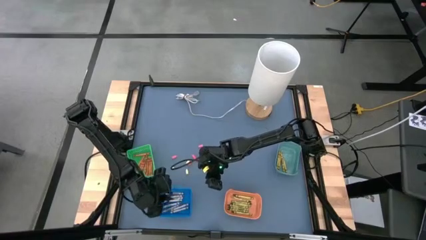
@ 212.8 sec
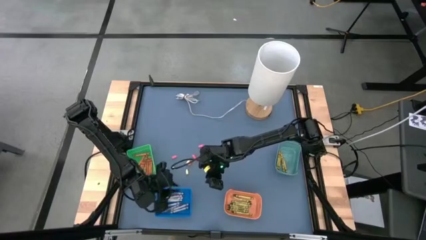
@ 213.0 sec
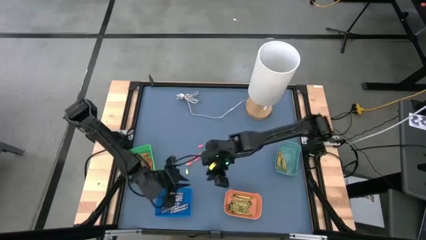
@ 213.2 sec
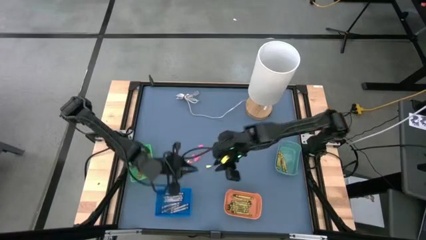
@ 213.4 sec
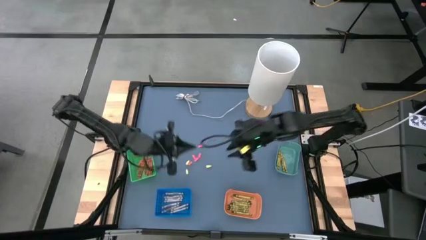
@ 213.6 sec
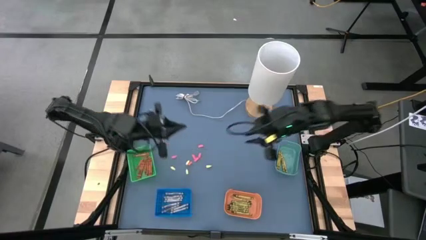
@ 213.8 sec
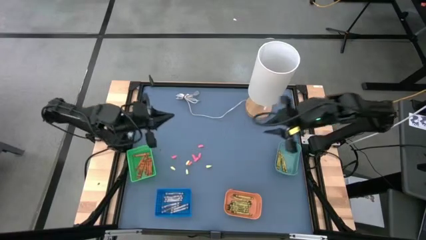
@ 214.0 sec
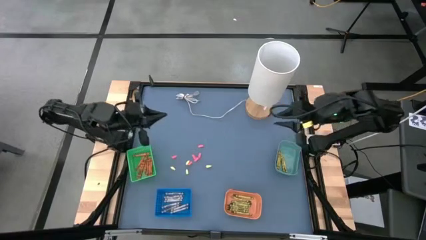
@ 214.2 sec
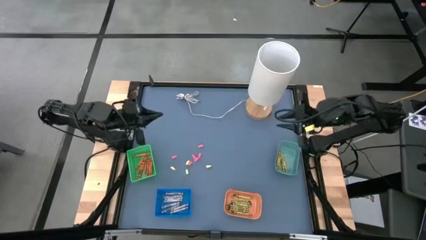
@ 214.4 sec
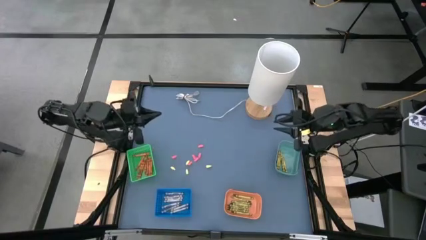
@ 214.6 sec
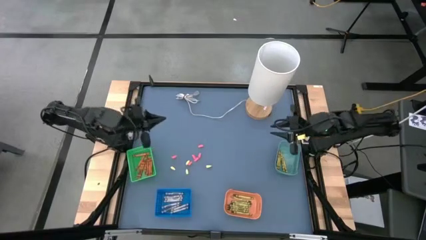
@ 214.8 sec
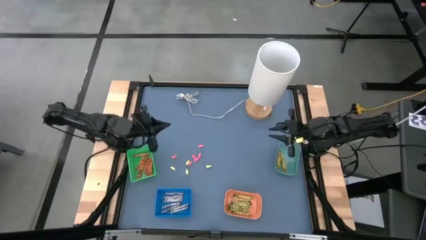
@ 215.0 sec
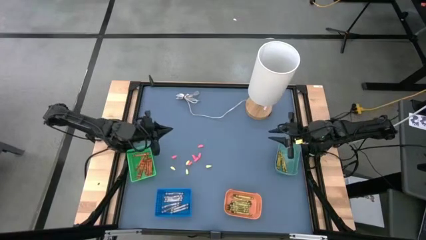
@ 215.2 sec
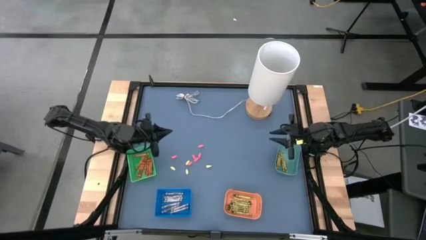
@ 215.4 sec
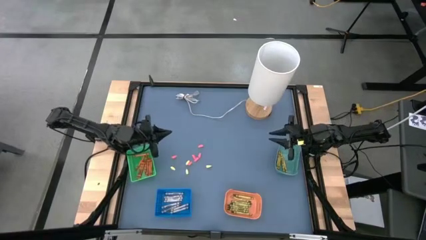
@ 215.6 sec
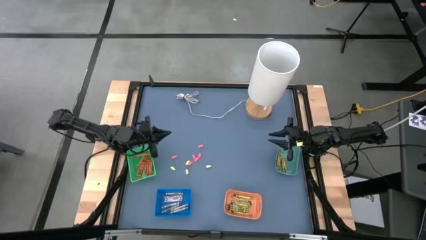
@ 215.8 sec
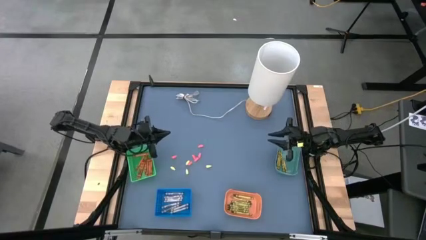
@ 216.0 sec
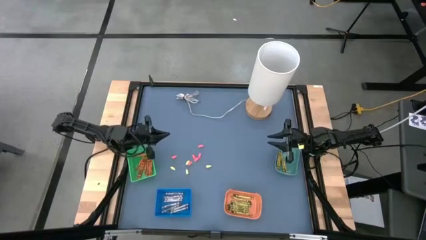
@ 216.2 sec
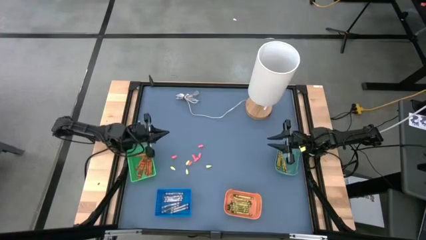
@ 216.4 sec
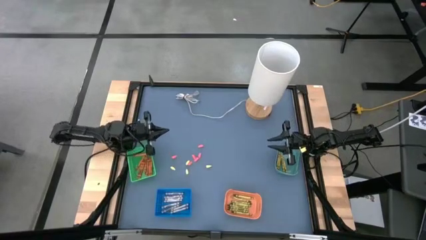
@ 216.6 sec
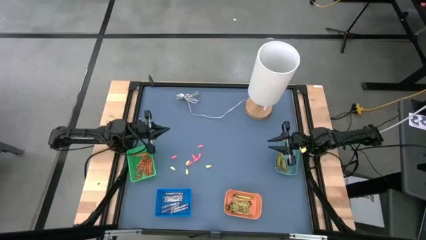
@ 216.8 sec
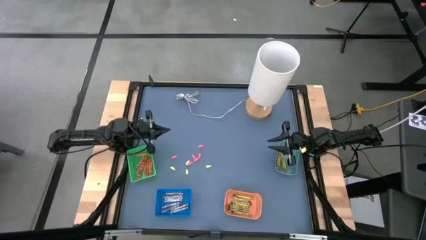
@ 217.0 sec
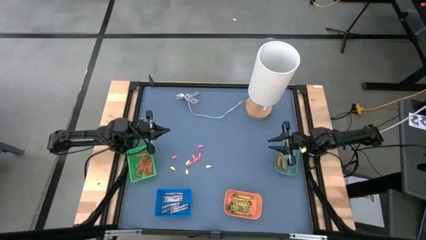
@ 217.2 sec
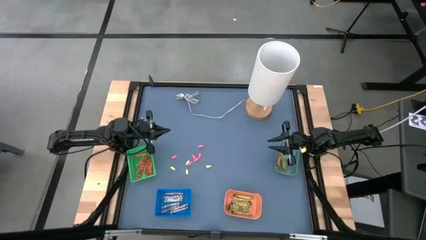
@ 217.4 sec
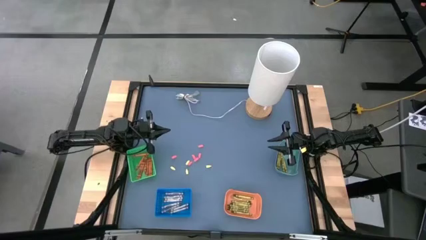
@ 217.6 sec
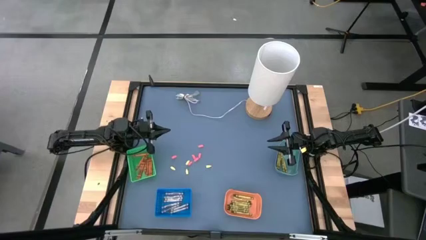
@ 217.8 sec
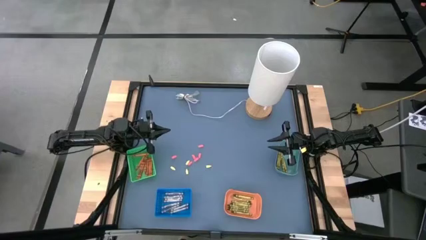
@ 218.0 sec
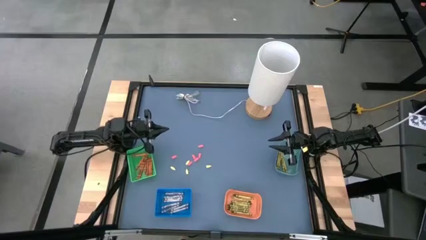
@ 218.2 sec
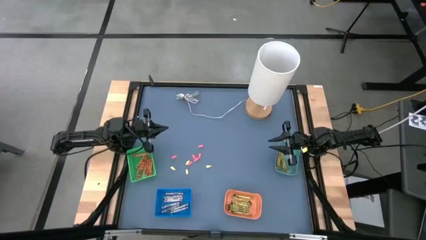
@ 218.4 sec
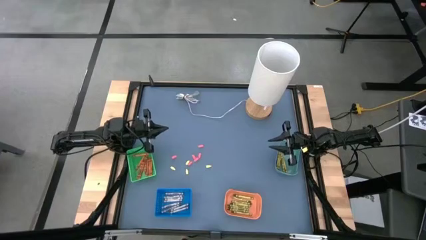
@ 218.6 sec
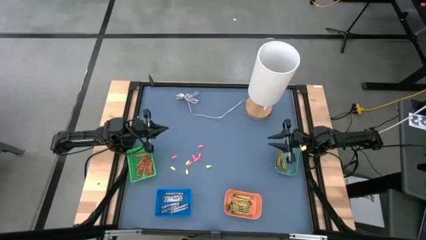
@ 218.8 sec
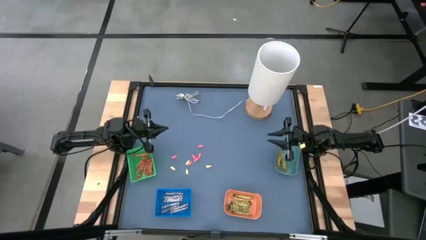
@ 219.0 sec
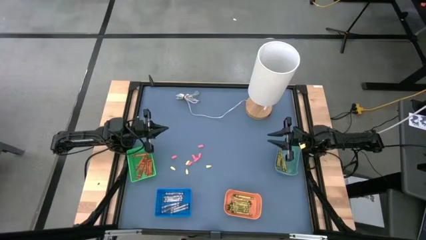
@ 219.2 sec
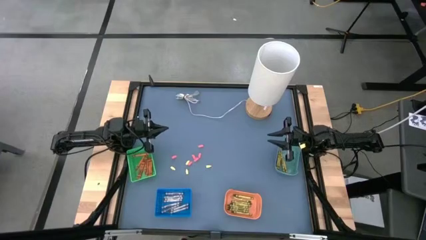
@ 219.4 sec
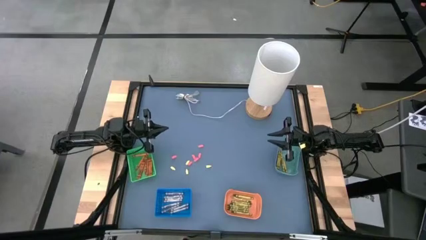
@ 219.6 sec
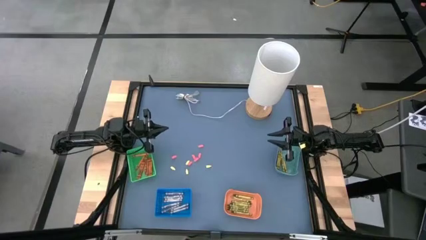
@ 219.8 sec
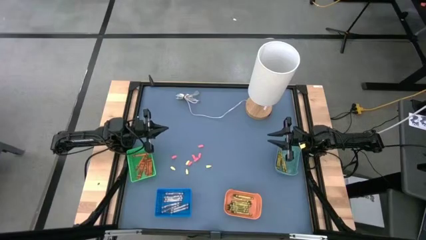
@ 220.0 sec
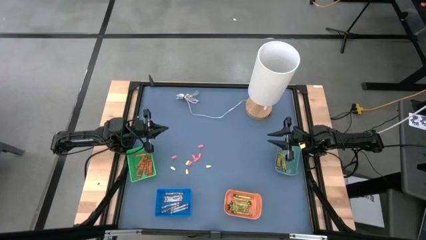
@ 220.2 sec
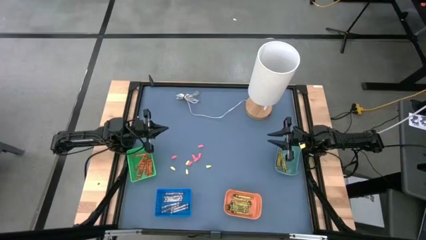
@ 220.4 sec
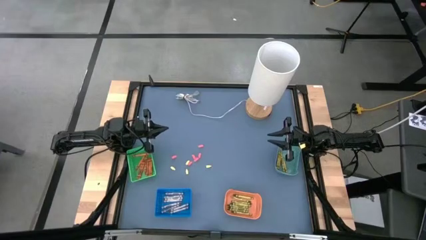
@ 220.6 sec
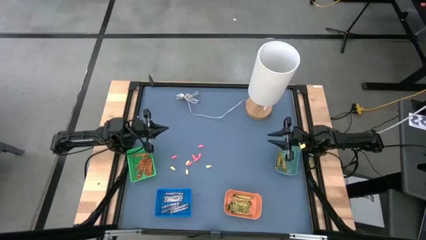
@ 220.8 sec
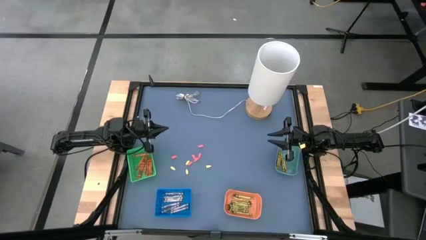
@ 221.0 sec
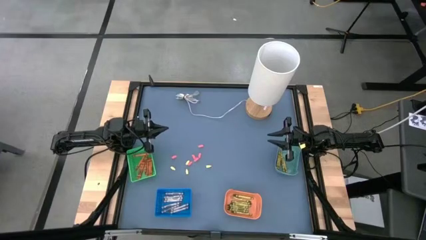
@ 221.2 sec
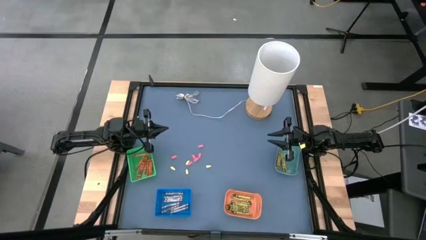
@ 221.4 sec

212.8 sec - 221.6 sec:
Task: Sort crayons
Return to Home Position

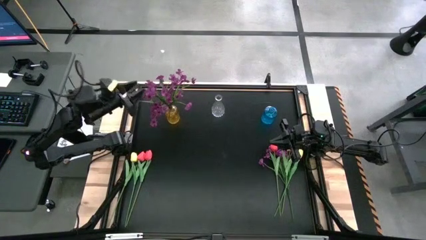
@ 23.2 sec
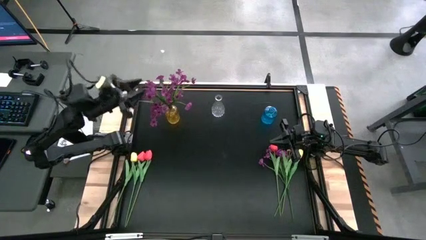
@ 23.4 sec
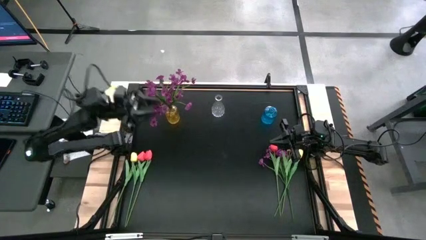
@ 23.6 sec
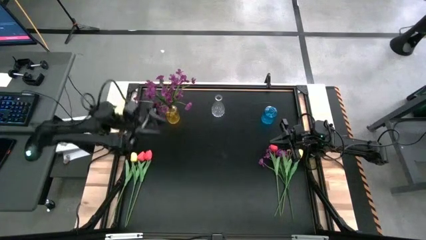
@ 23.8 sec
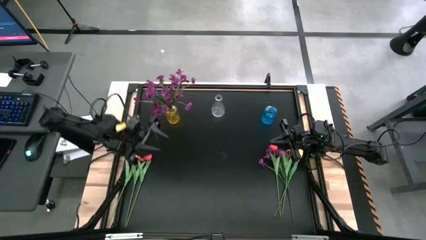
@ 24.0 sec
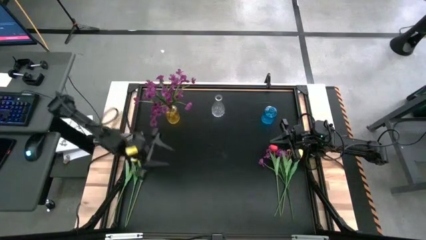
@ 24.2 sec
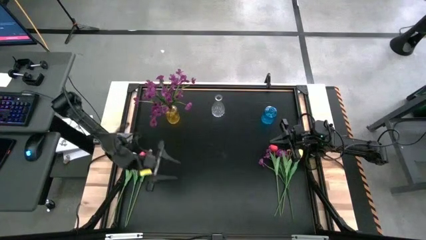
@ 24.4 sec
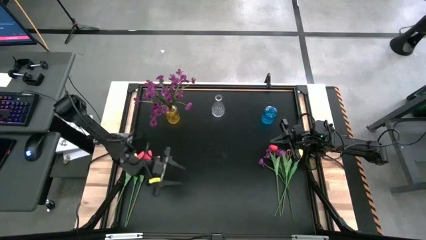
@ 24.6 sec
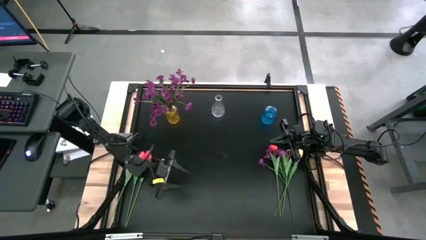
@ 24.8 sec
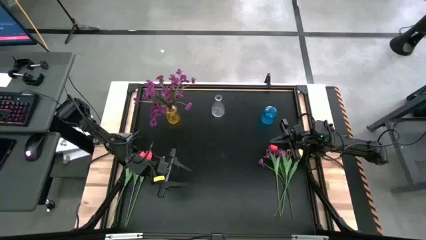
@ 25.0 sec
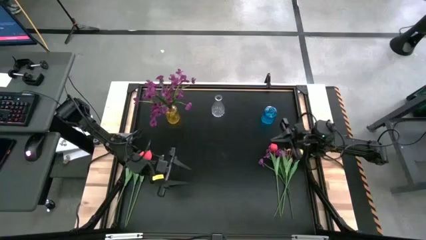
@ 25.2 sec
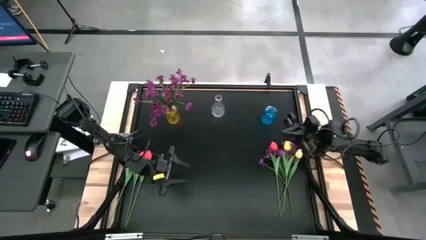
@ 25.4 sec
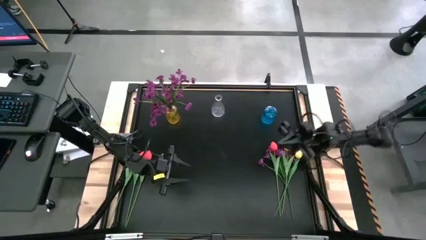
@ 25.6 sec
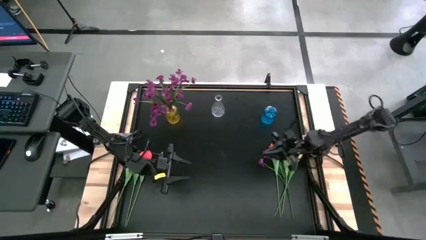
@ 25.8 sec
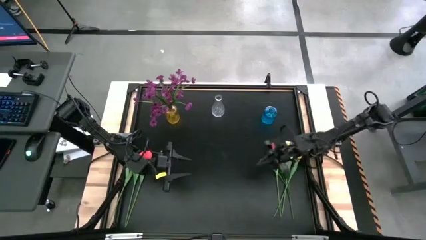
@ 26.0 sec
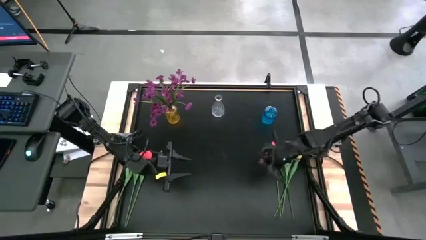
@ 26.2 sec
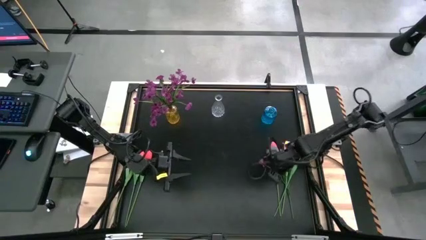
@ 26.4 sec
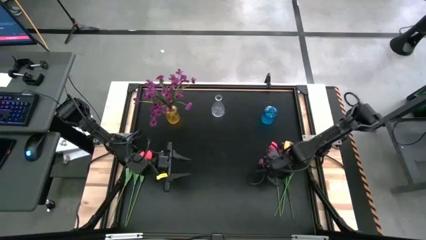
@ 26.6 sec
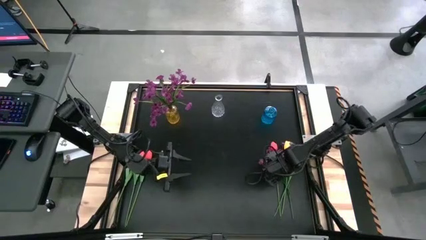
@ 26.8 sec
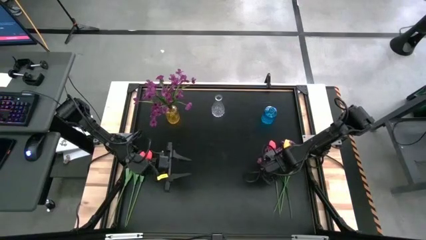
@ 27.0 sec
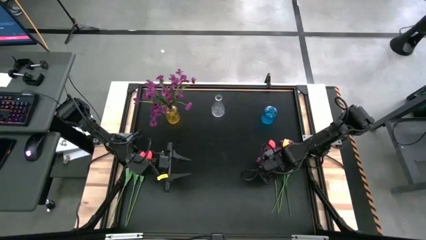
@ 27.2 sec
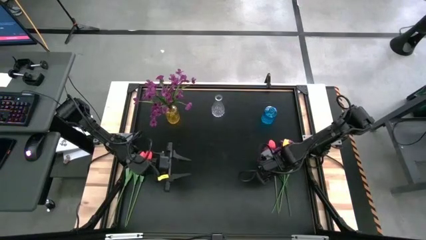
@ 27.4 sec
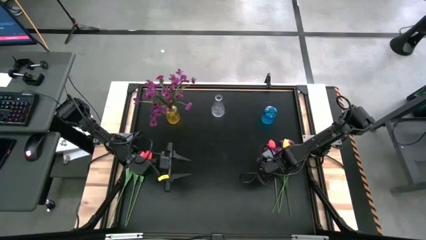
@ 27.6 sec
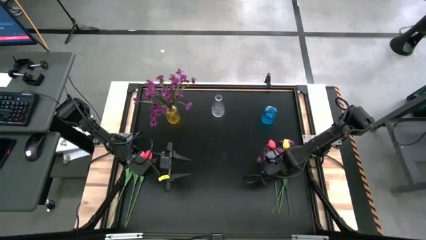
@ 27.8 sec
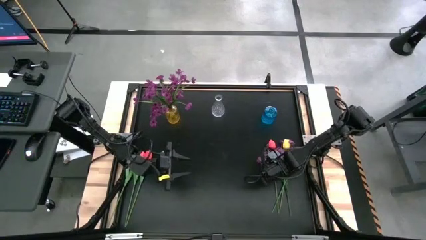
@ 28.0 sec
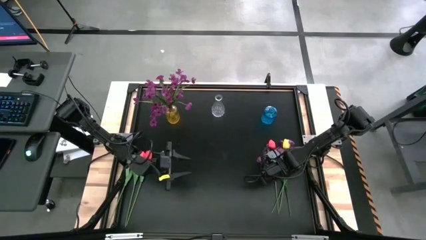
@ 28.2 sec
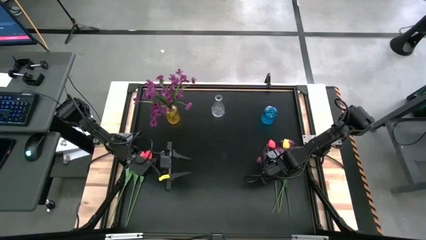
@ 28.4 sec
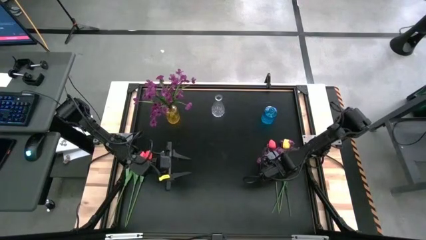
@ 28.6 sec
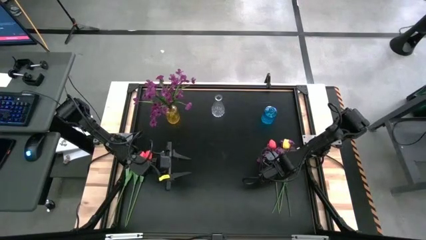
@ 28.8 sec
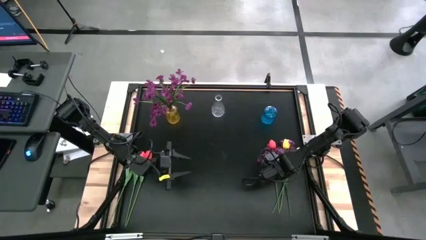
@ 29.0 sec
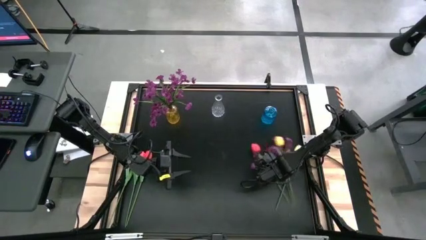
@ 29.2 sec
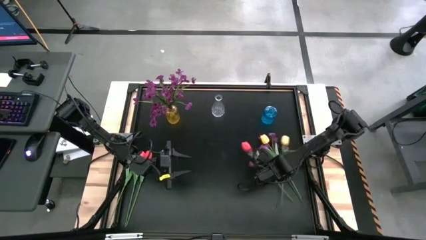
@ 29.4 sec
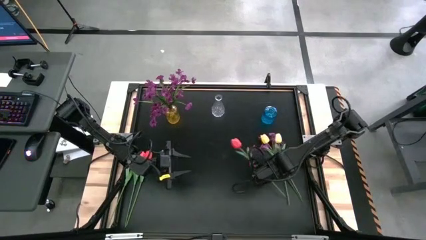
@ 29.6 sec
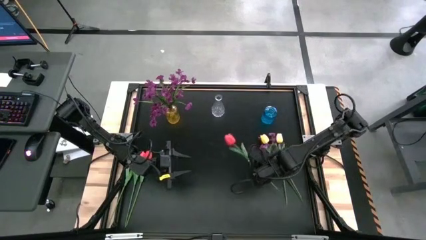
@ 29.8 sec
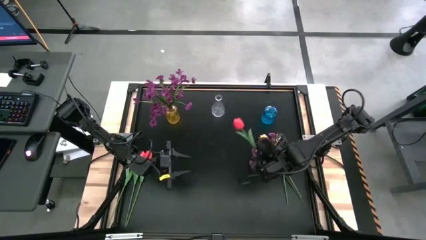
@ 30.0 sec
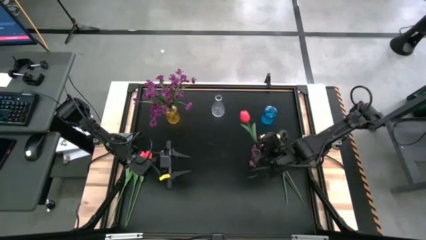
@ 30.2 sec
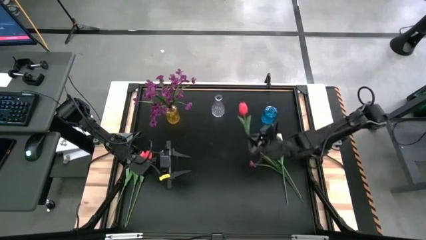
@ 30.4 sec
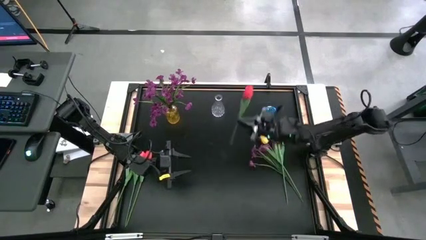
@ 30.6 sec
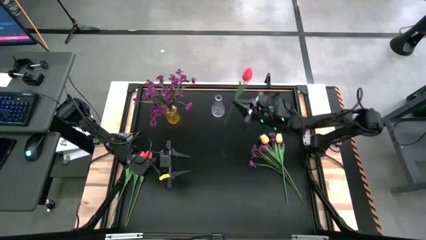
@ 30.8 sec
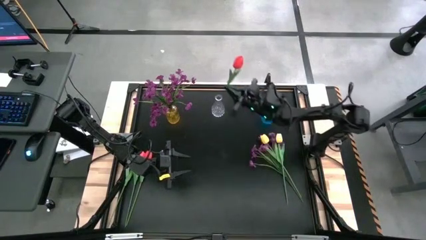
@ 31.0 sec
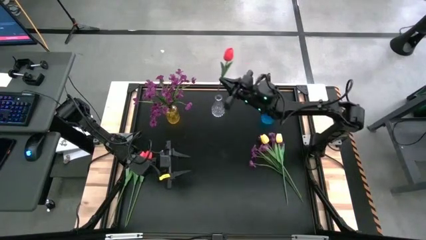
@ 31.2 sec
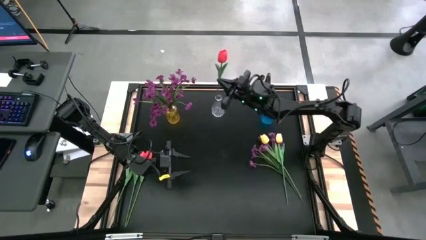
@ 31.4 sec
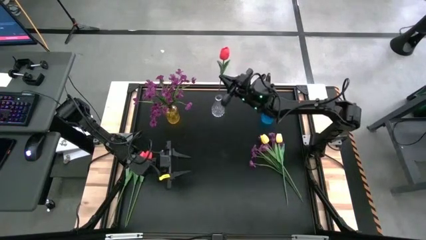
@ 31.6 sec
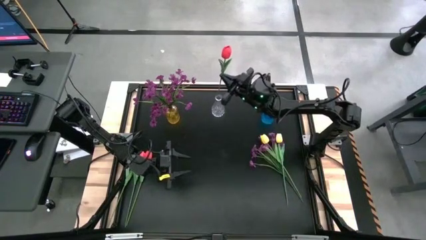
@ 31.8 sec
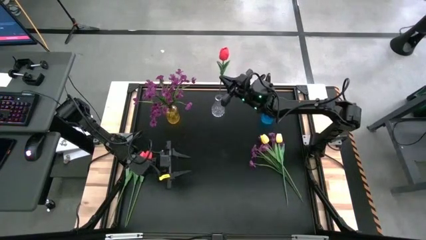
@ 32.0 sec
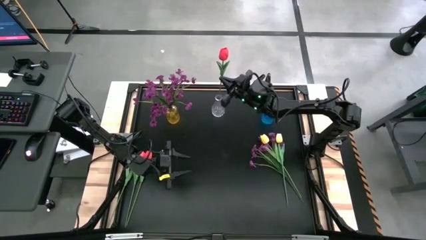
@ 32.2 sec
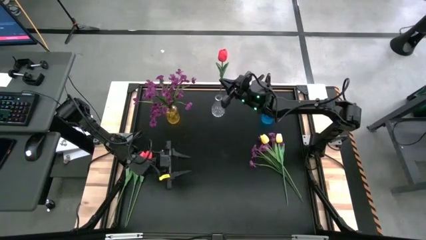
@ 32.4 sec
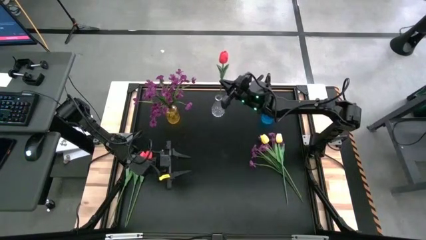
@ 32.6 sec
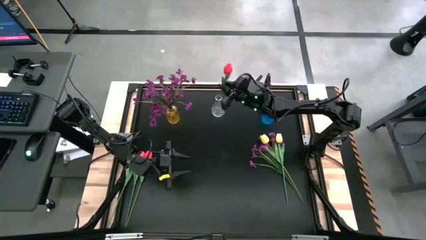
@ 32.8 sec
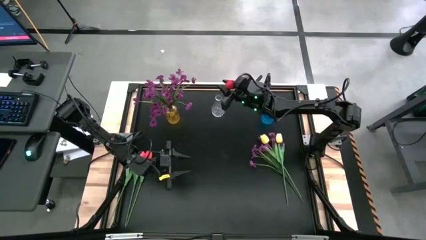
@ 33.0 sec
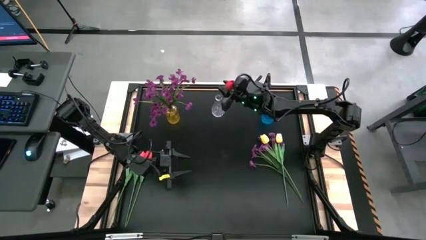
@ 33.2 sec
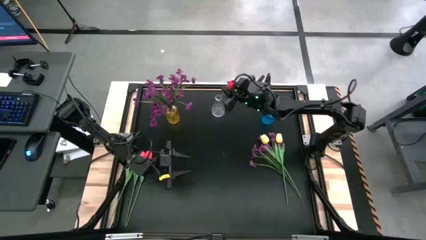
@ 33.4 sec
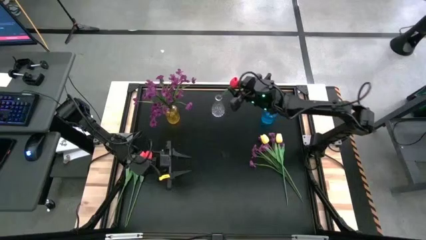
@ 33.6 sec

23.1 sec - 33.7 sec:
Task: Sort flowers into vase by color
Put the right red flower into the transparent flower vase
